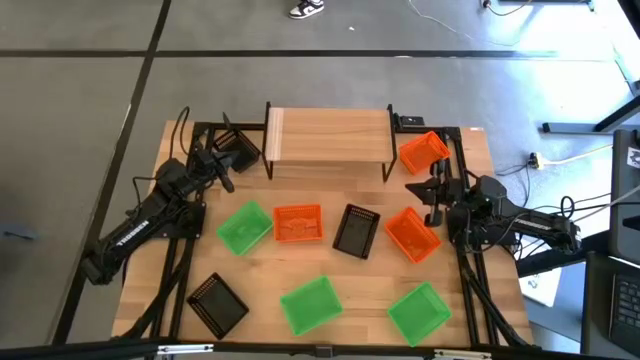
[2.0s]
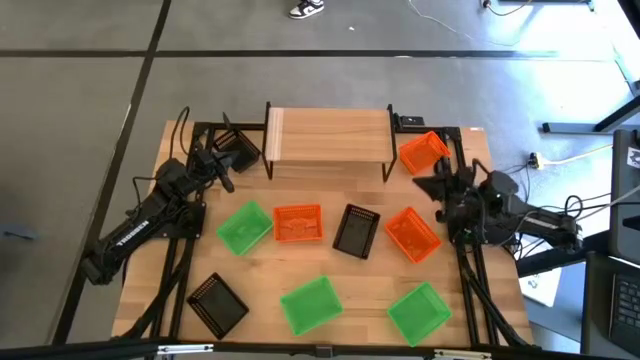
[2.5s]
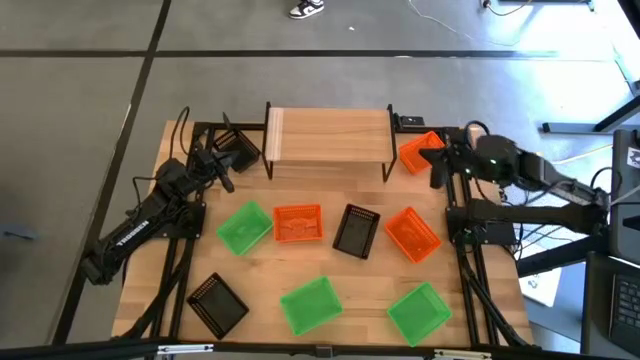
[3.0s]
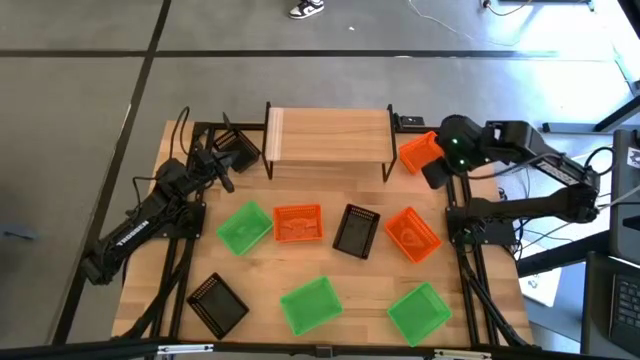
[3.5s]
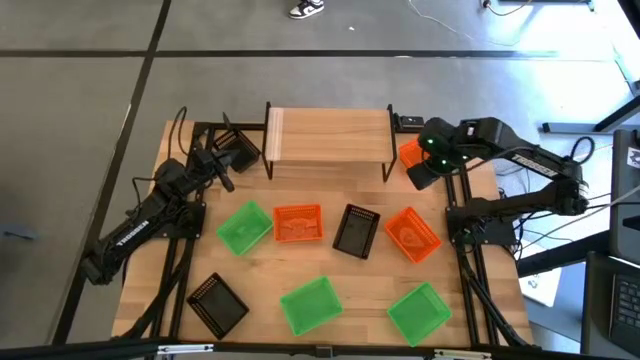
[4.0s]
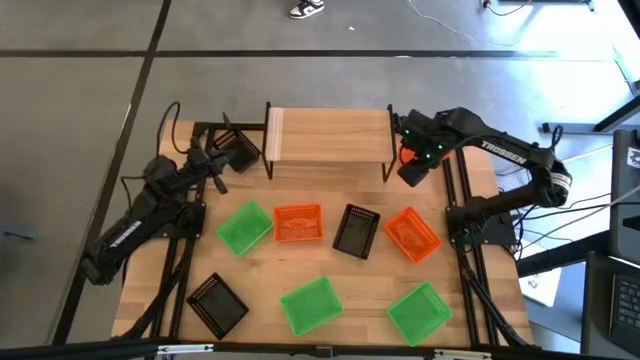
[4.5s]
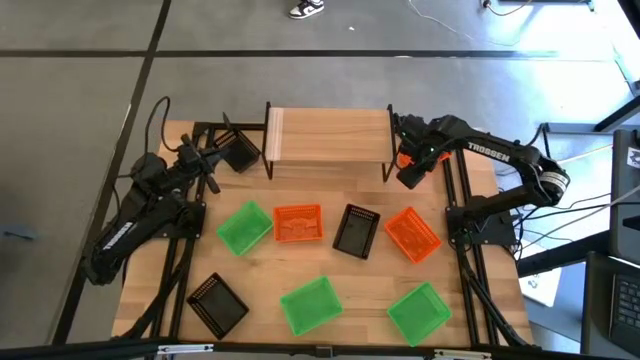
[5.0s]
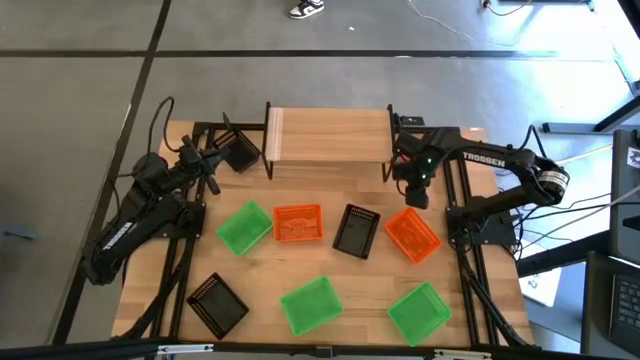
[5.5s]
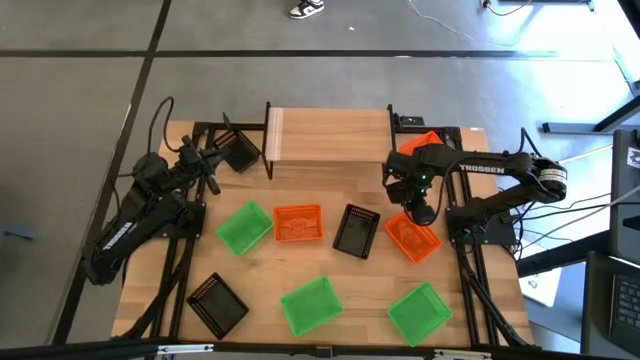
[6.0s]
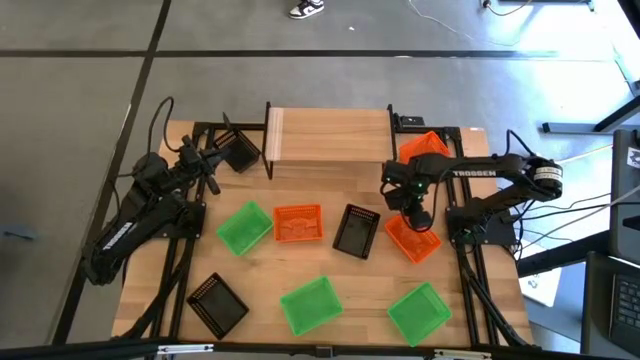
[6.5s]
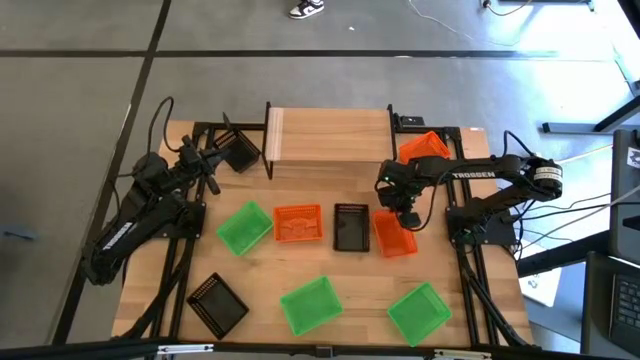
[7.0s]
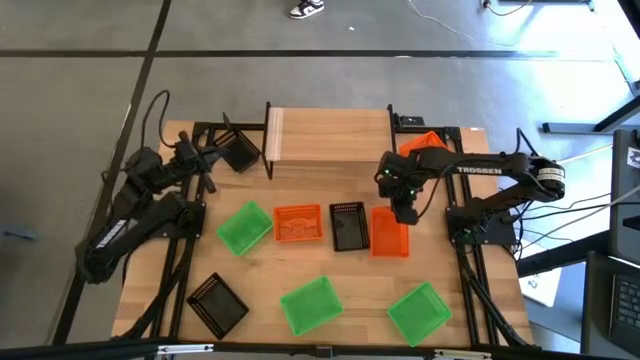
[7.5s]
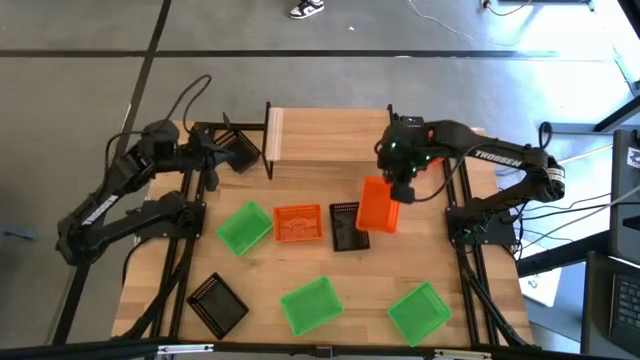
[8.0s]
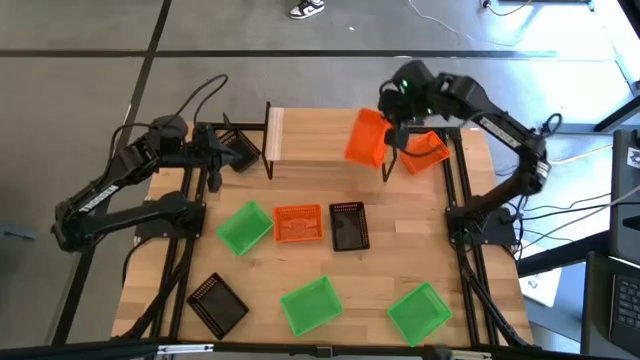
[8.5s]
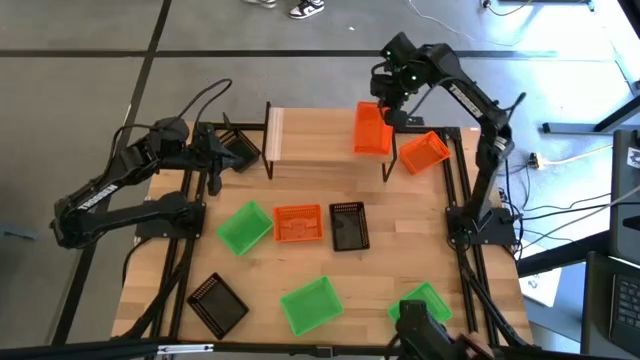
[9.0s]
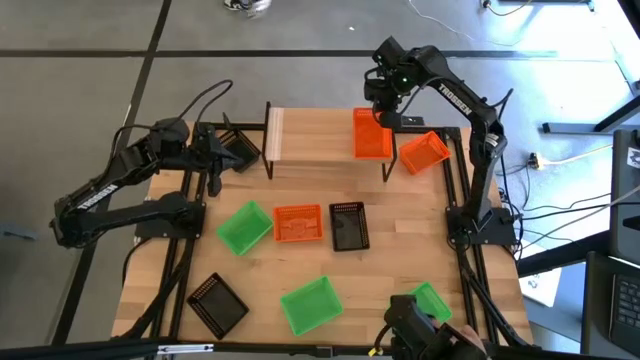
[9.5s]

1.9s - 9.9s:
Task: Stack baskets on shelf by color
Put the bottom right orange bin on the shelf

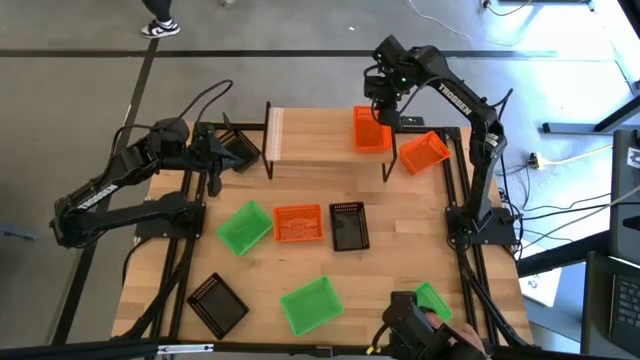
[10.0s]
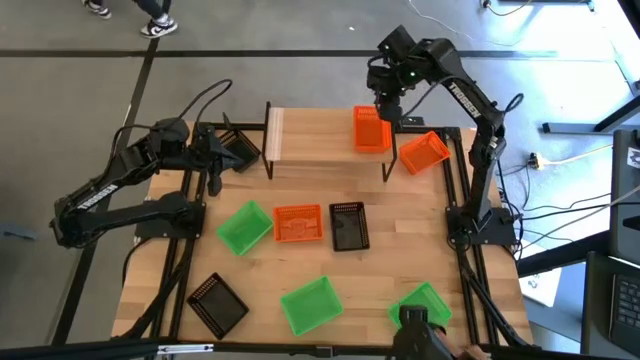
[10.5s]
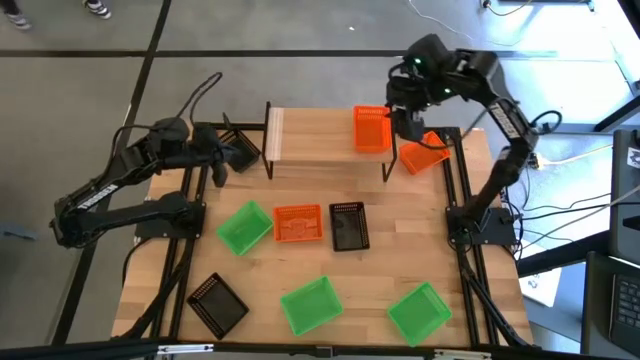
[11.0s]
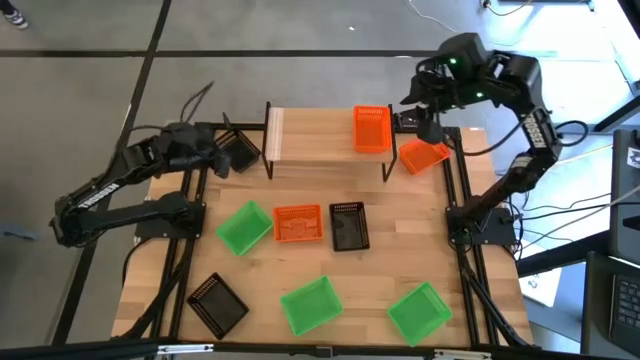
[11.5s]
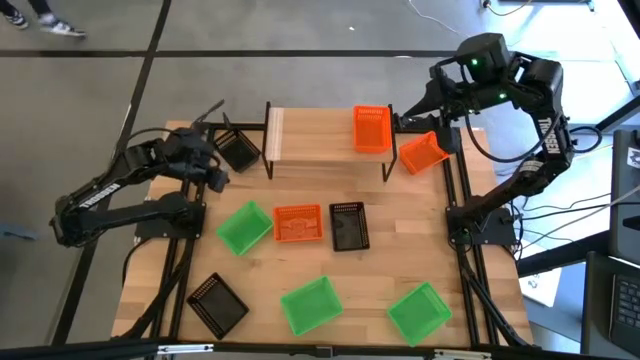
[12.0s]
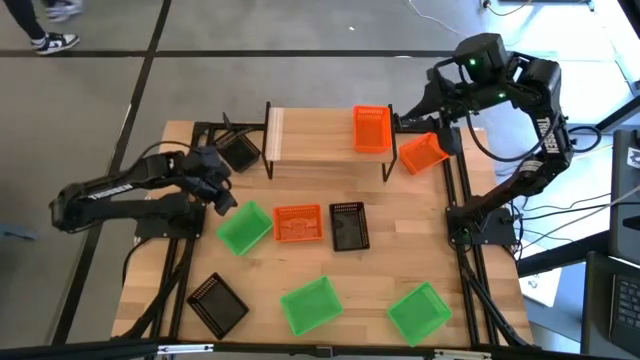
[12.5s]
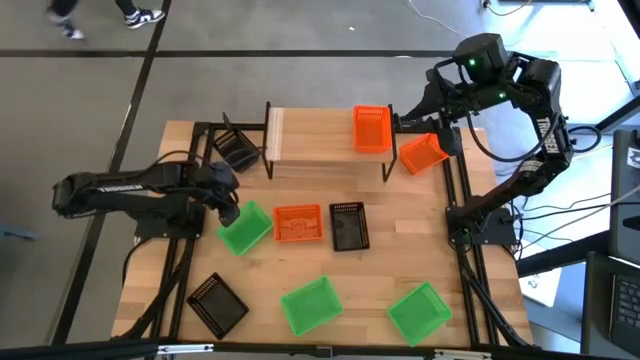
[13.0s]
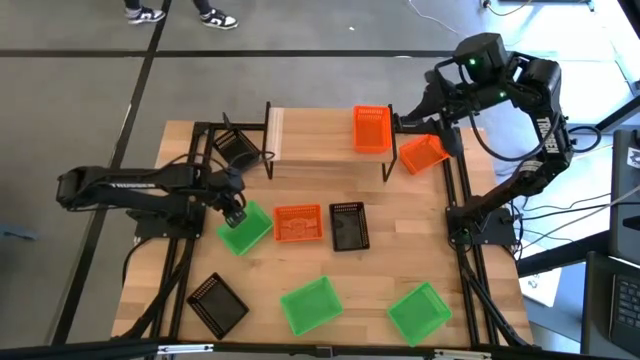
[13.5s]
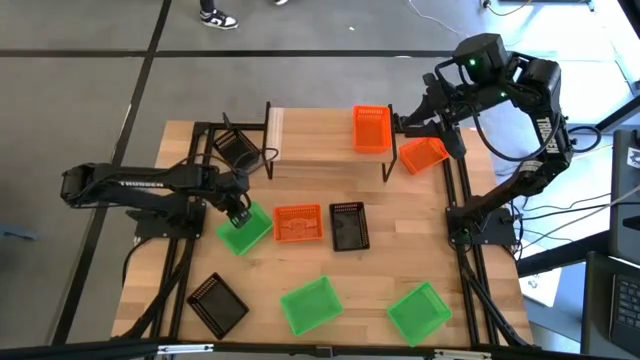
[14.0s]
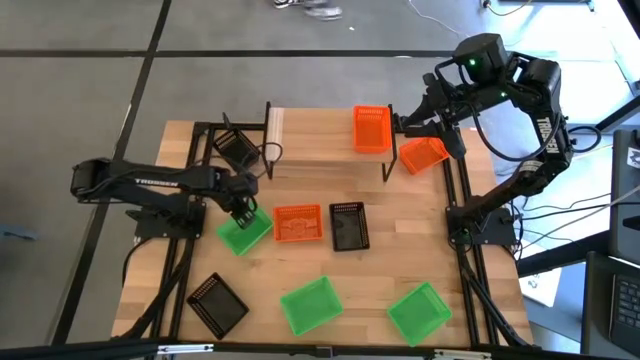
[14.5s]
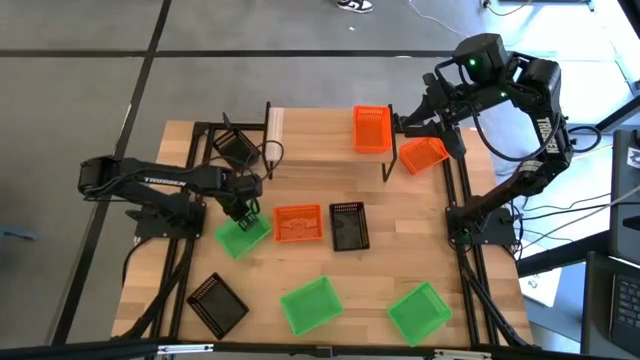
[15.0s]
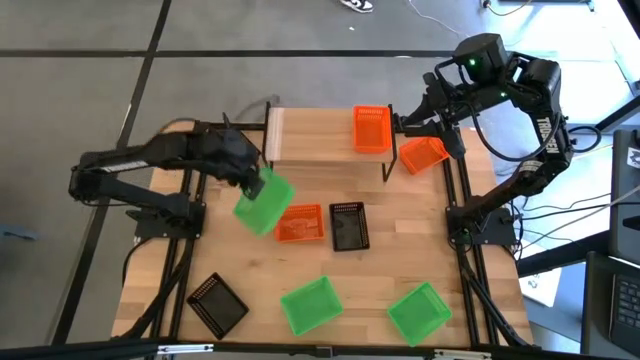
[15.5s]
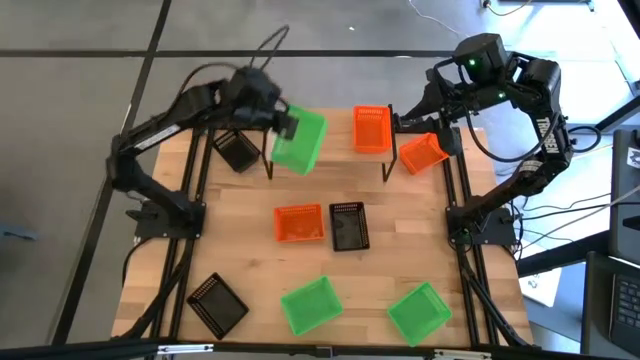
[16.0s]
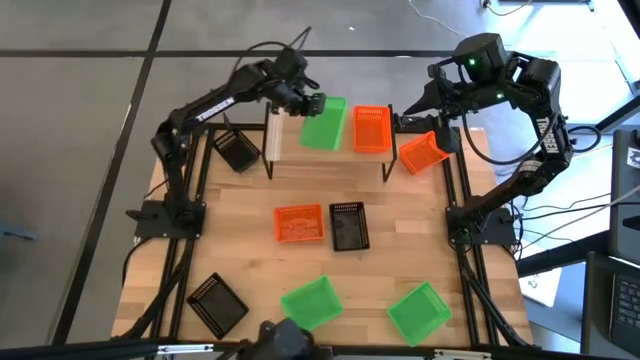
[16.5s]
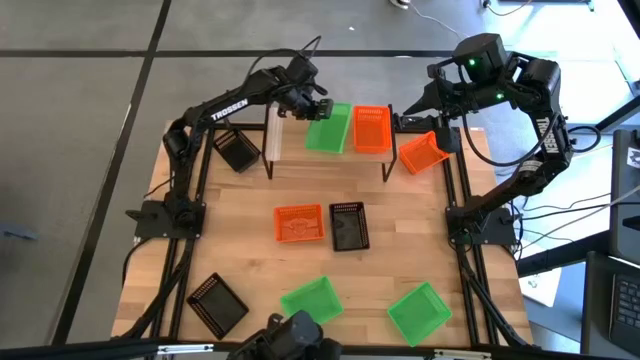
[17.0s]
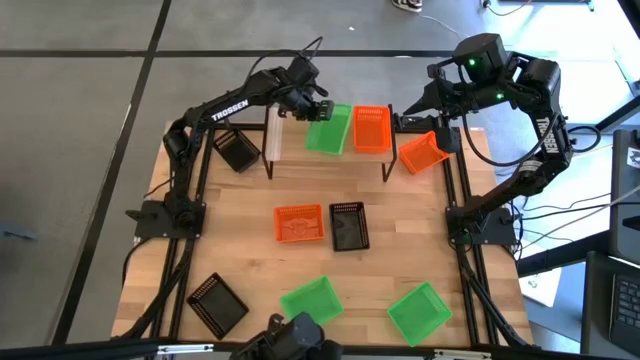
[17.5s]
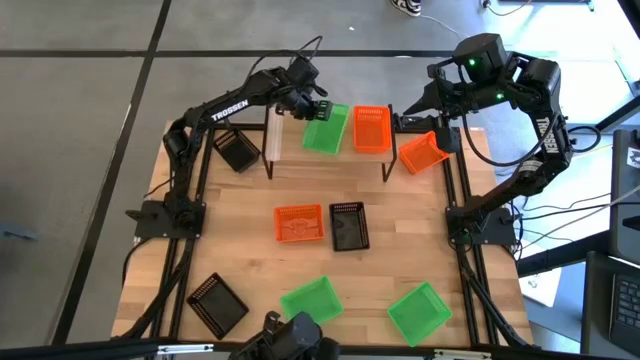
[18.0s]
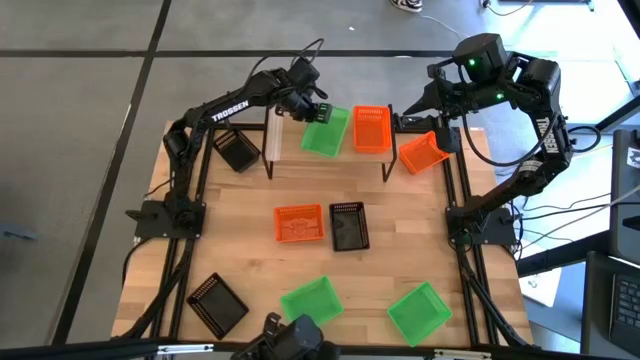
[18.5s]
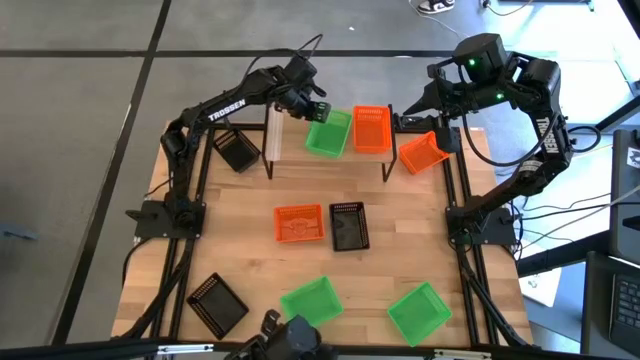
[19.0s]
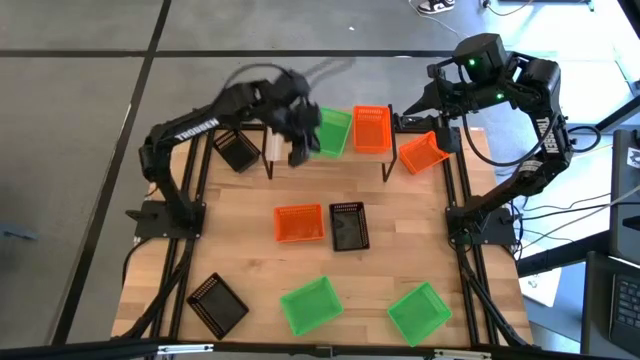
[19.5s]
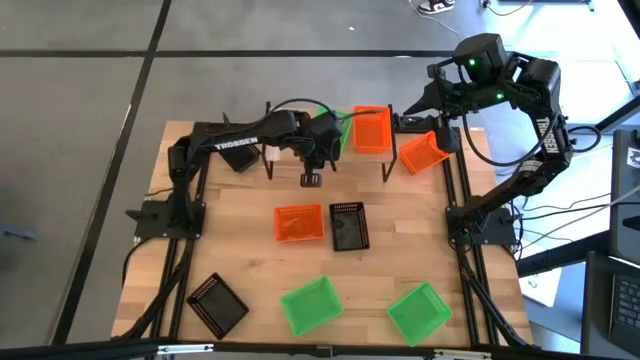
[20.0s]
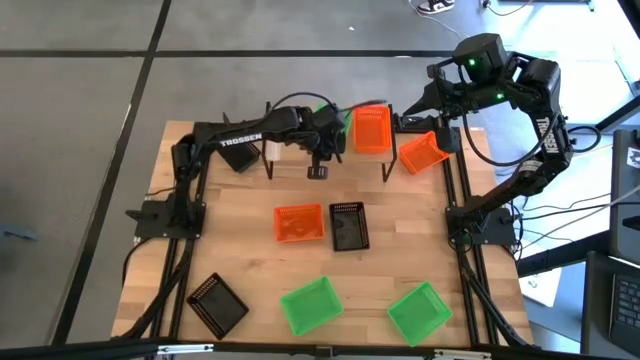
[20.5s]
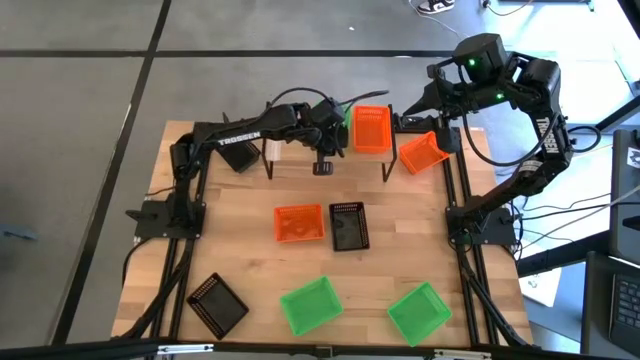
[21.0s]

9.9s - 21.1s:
Put the top green bin on the shelf

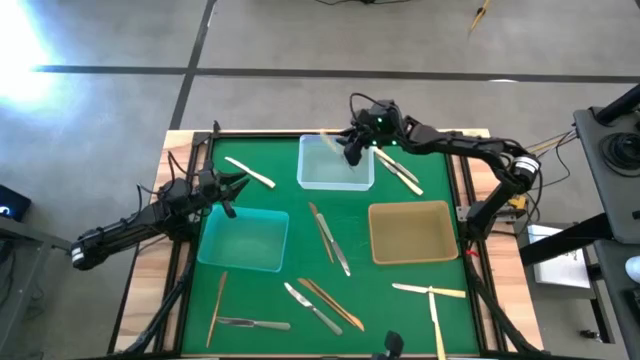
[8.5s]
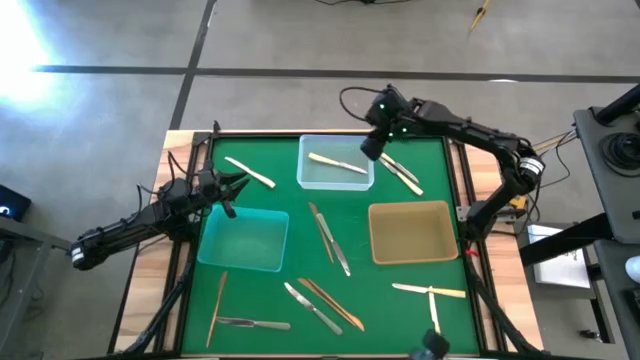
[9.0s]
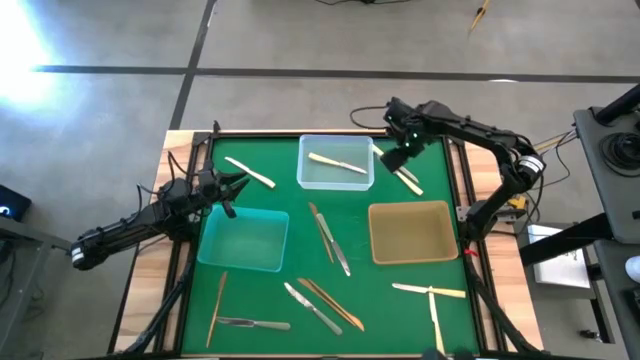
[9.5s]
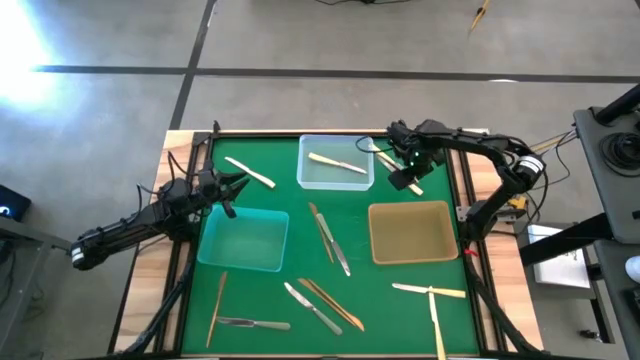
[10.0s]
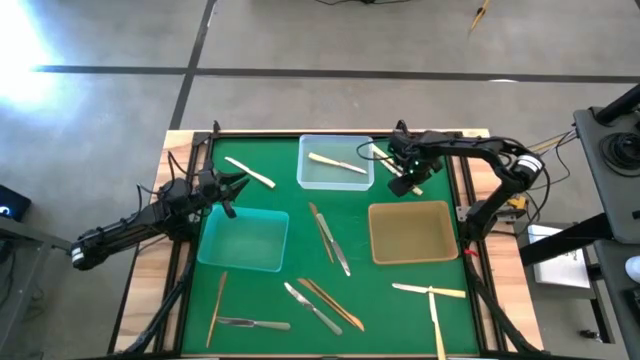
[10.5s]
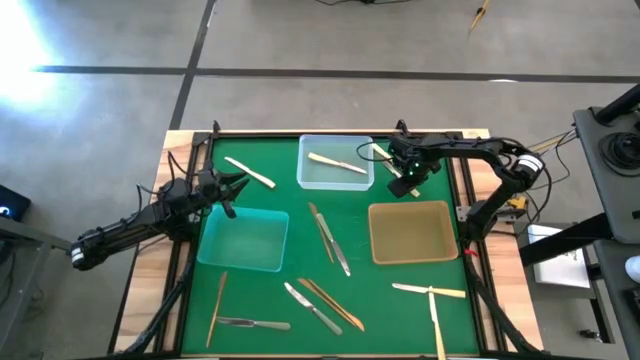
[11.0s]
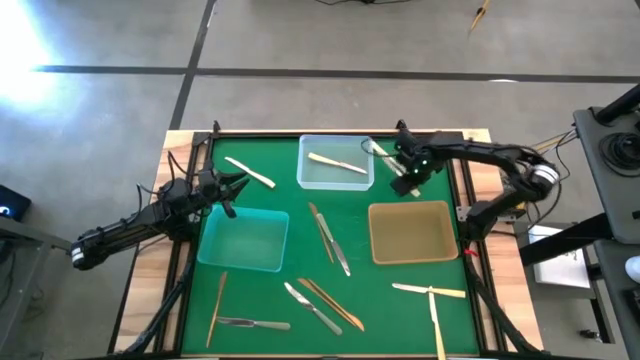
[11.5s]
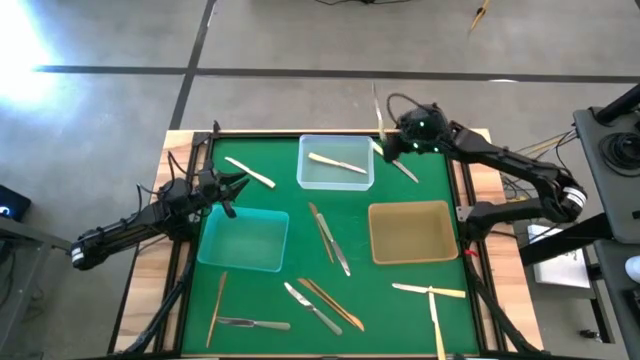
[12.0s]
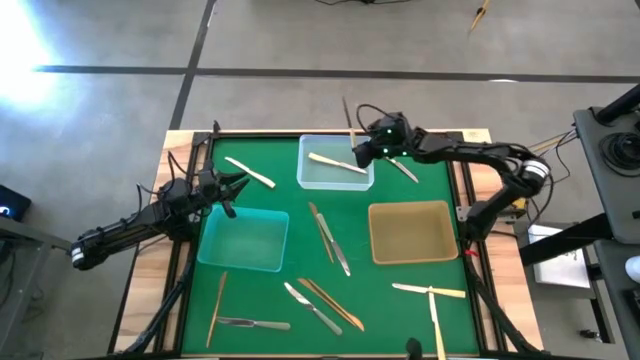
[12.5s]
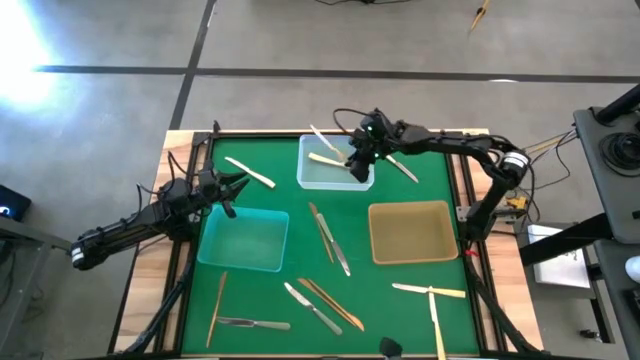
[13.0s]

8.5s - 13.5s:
Task: Sort silverware by color (type)
Put the yellow knife into the transparent bin
